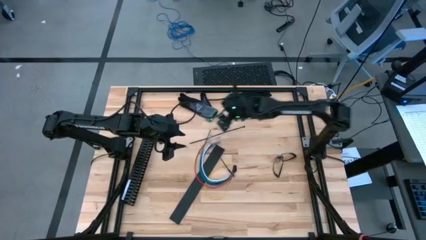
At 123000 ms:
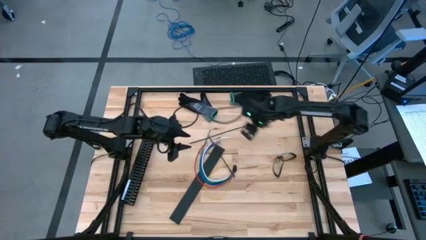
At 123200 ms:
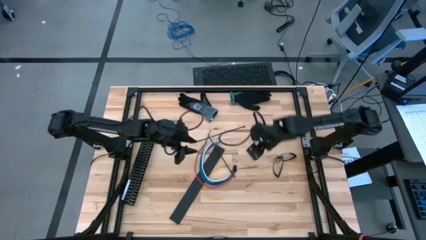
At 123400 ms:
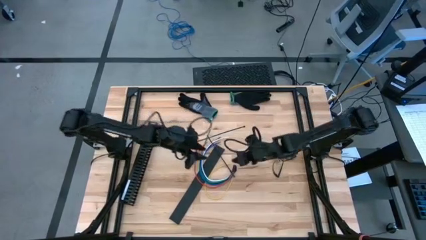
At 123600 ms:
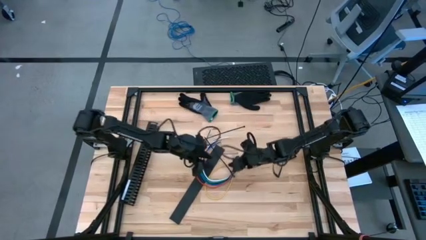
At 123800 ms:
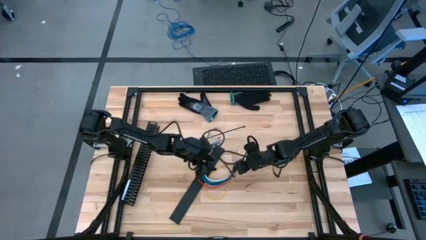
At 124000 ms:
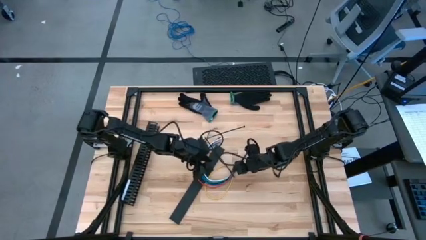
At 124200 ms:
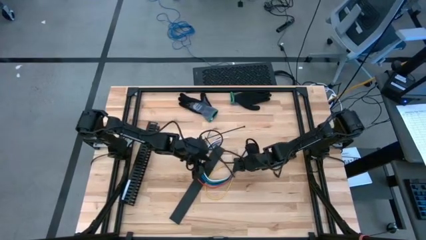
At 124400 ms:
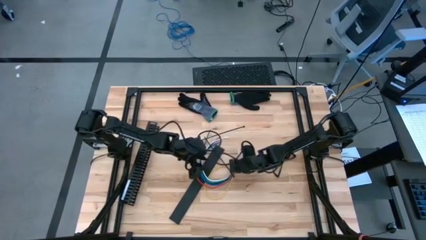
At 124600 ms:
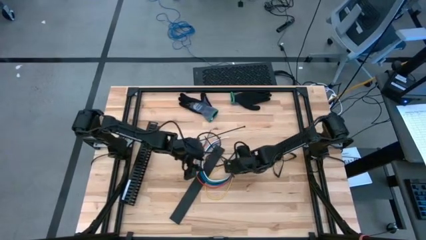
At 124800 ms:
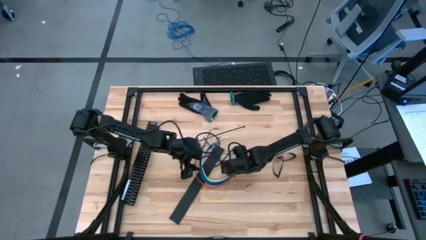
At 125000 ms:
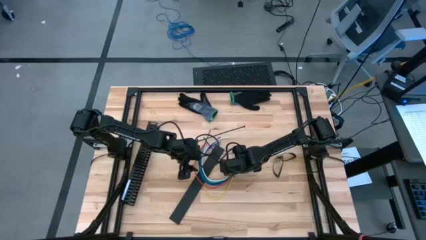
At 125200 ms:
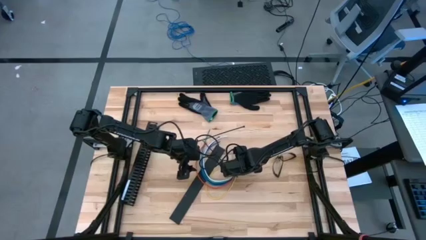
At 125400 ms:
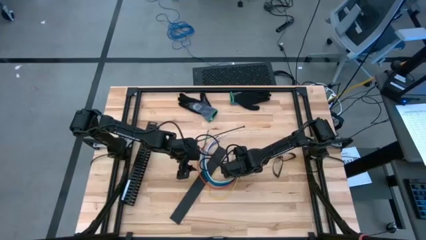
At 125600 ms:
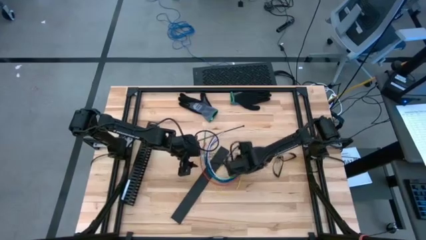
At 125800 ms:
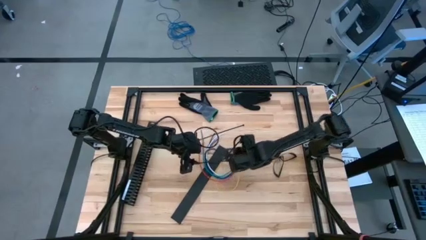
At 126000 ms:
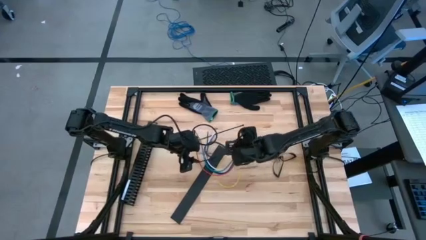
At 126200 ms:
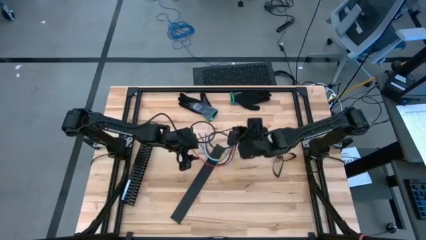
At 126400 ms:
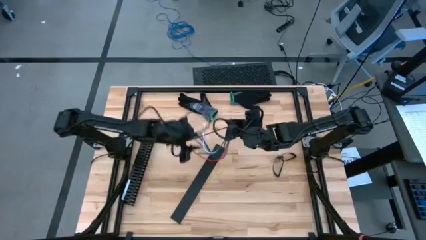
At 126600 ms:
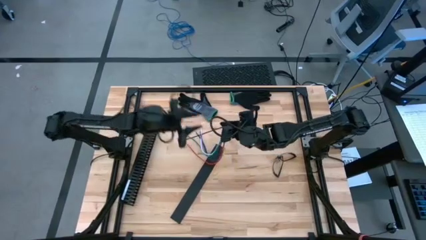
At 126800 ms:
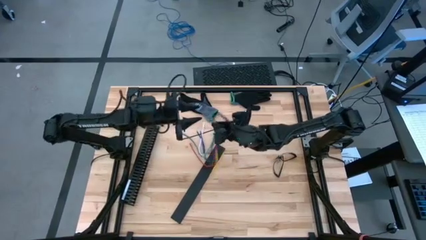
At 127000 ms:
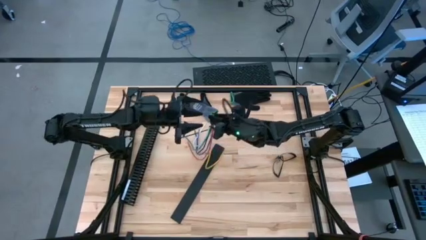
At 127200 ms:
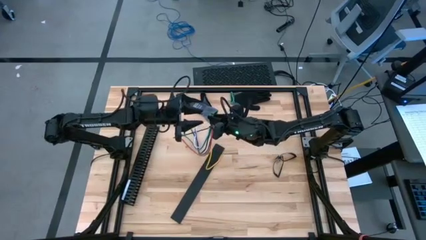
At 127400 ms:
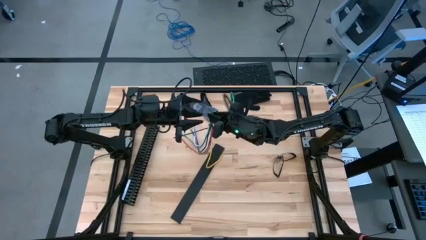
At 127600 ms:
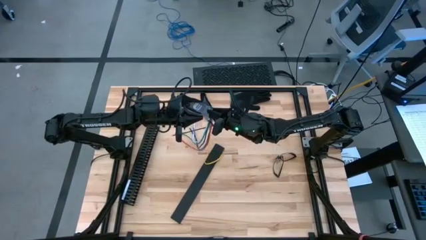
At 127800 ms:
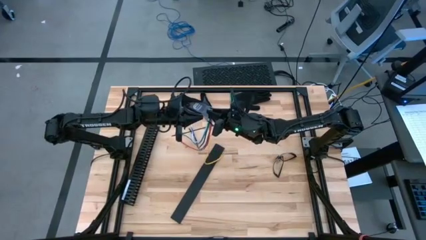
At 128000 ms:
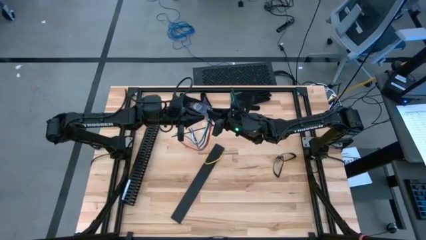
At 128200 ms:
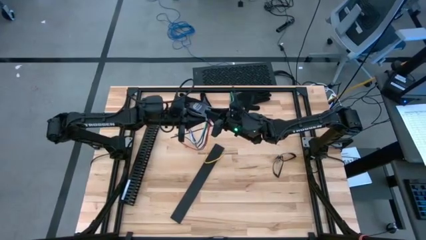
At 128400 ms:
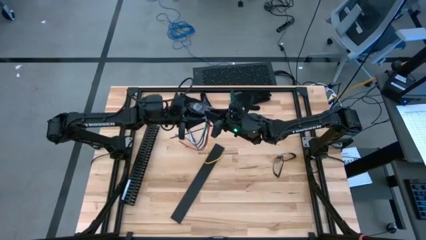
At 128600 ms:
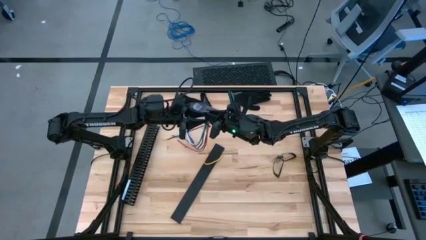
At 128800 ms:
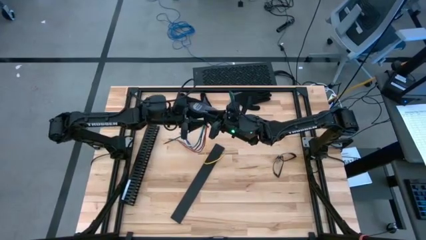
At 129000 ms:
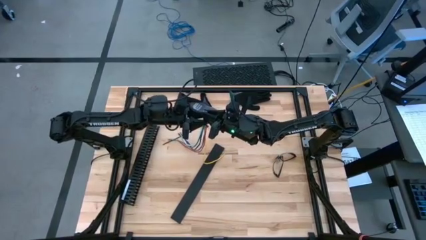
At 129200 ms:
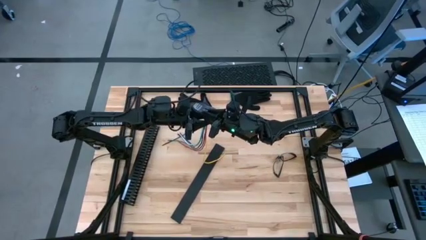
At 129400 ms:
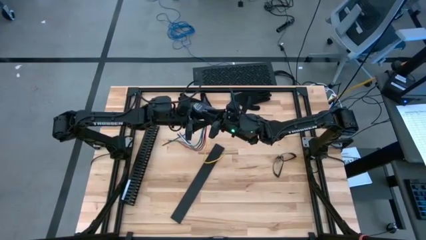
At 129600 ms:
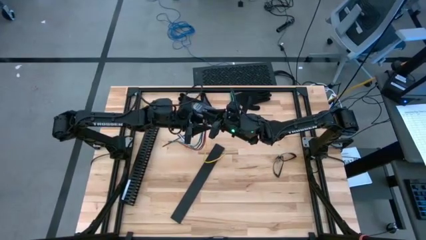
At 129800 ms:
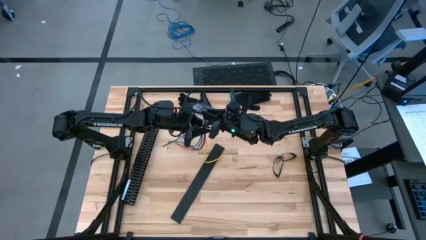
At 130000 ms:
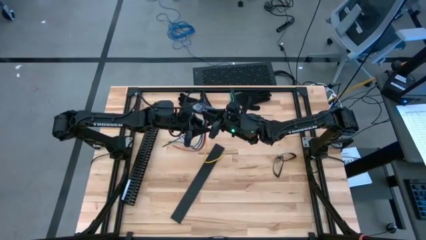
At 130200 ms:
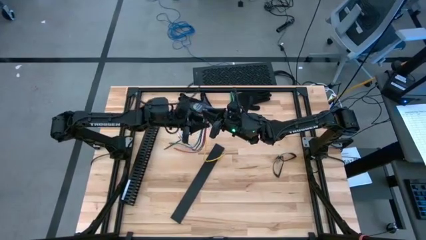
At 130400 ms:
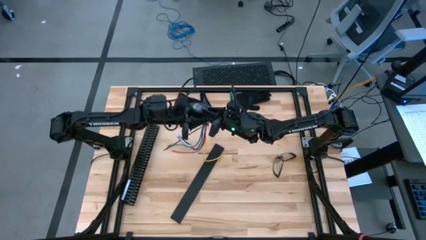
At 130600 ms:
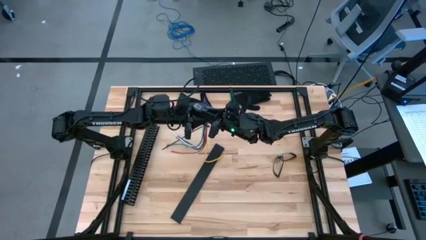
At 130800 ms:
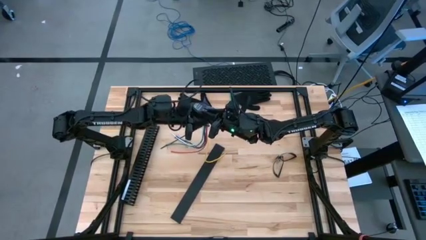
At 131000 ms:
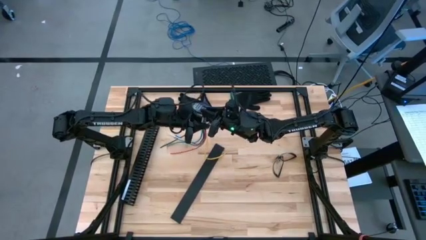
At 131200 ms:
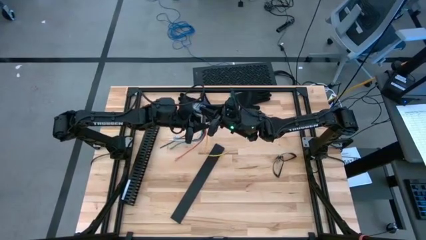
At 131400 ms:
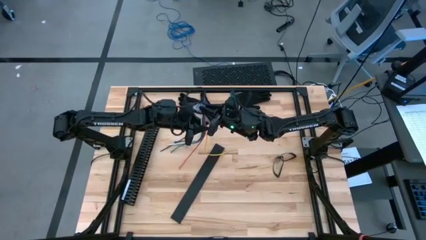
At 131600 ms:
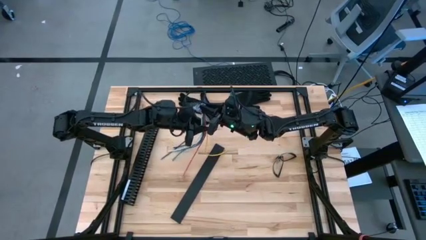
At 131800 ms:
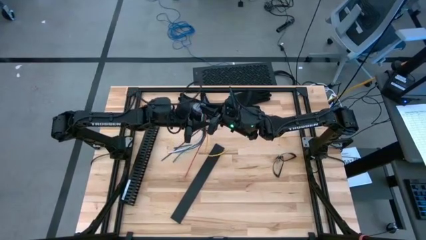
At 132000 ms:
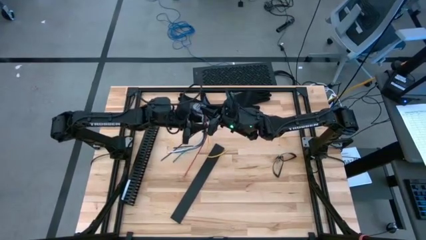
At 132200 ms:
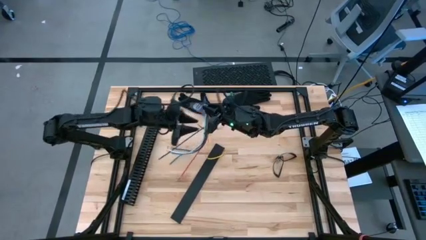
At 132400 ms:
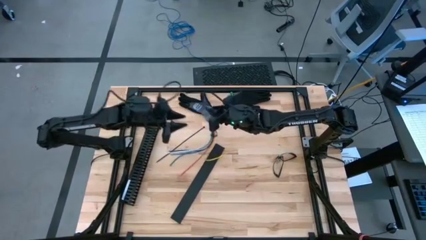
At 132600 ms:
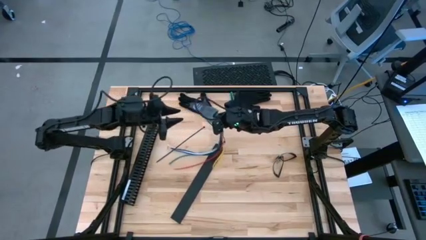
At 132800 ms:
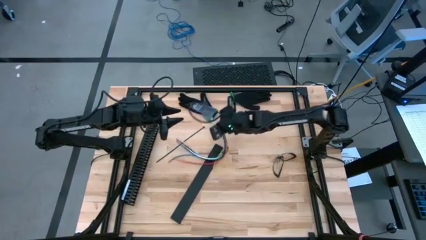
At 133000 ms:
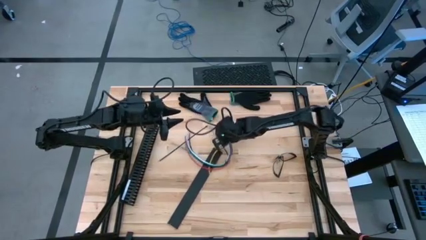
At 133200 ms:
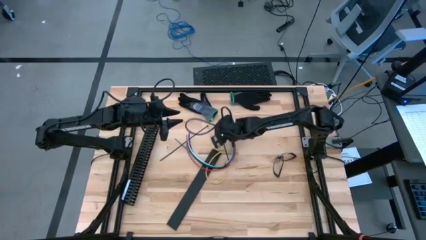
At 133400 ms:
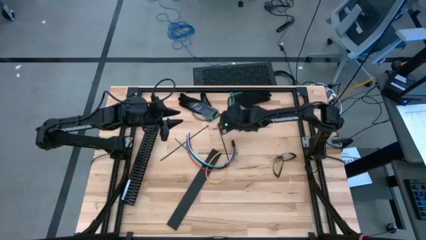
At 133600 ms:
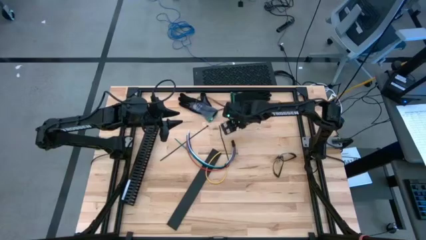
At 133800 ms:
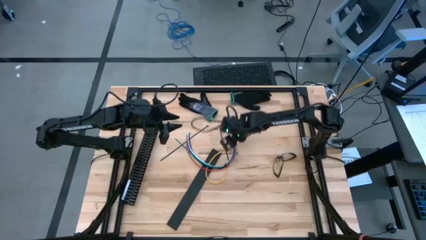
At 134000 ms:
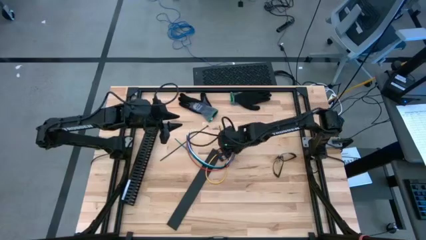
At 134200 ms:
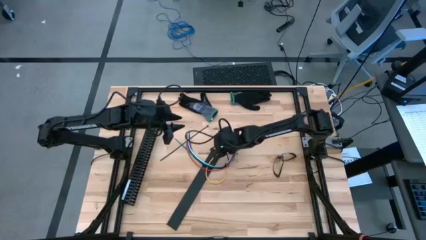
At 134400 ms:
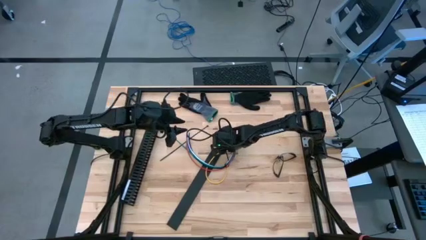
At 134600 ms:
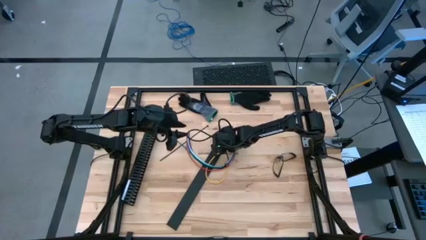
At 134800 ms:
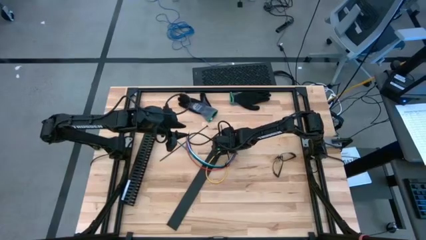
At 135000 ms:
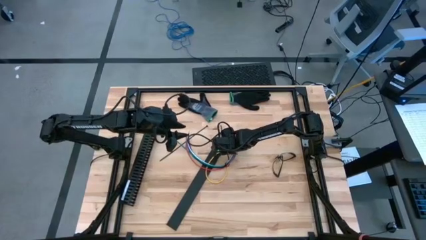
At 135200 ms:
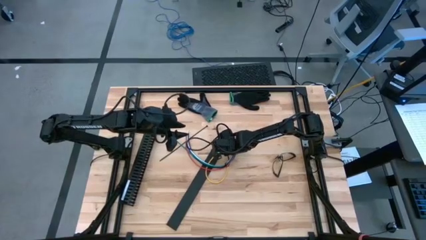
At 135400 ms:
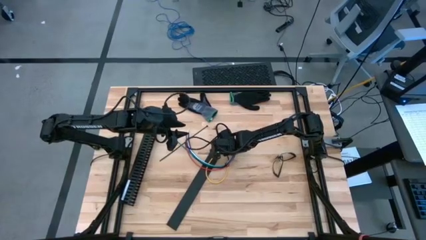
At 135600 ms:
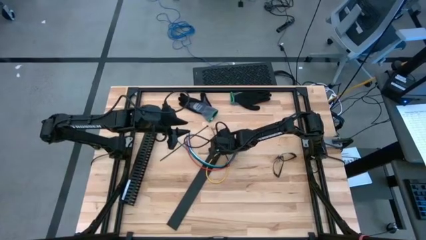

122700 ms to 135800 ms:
Task: Ziptie cables
Wrap the cables using a black zip tie

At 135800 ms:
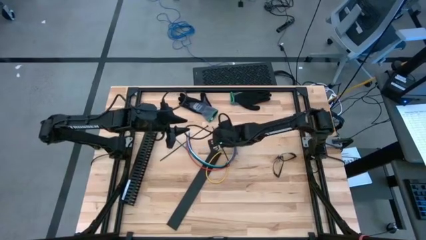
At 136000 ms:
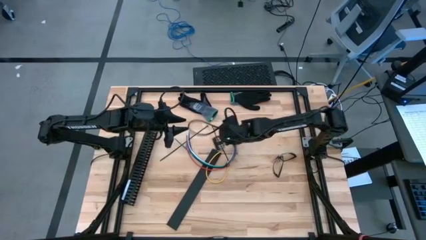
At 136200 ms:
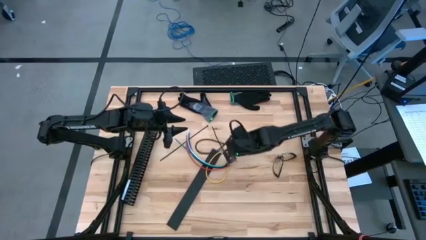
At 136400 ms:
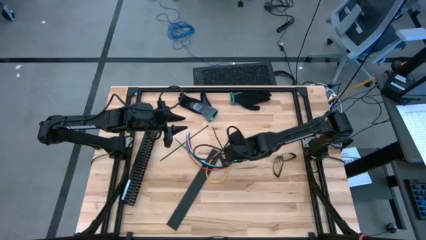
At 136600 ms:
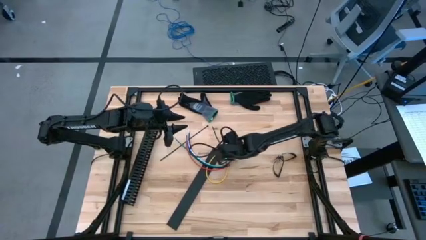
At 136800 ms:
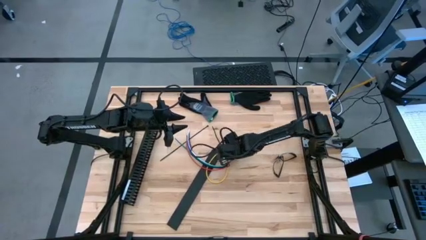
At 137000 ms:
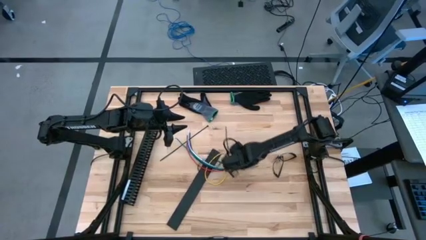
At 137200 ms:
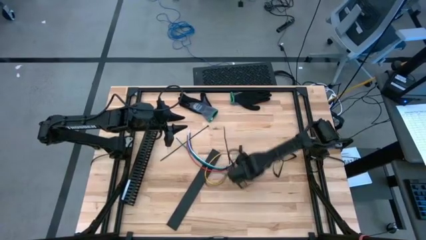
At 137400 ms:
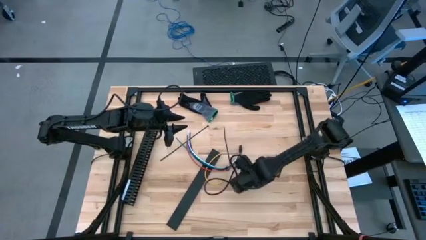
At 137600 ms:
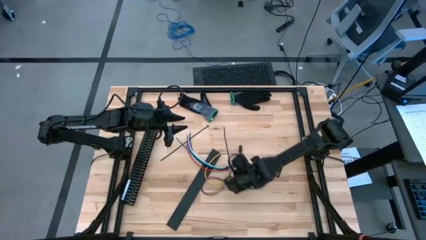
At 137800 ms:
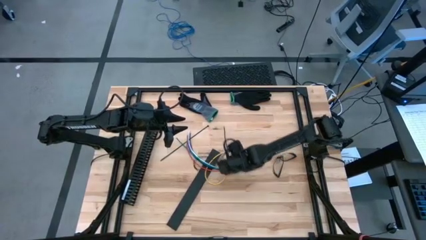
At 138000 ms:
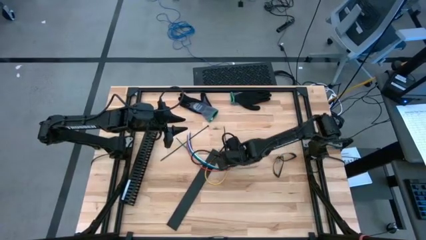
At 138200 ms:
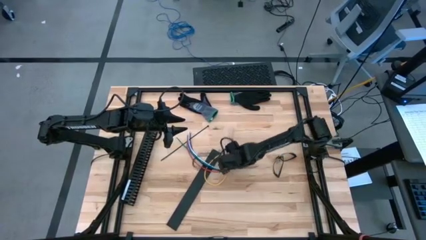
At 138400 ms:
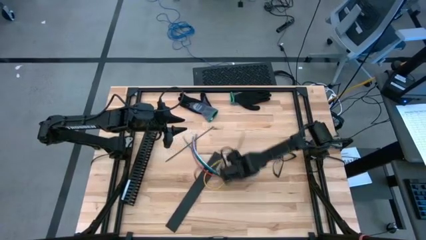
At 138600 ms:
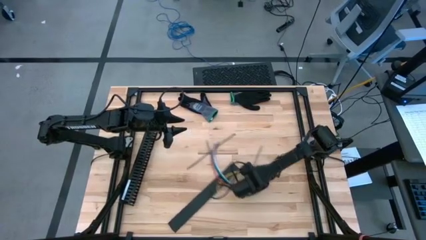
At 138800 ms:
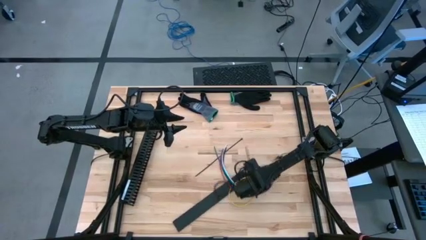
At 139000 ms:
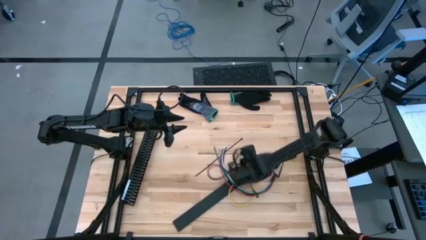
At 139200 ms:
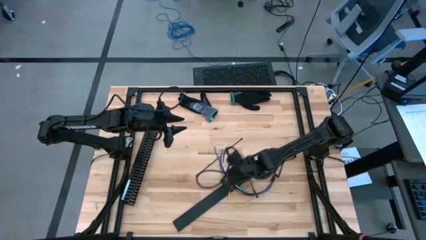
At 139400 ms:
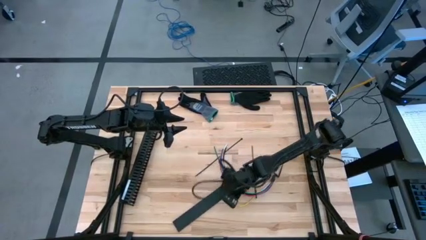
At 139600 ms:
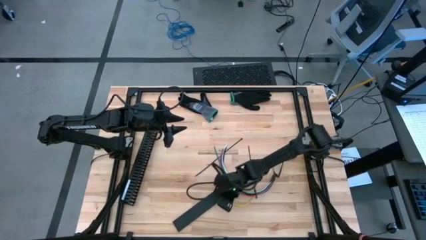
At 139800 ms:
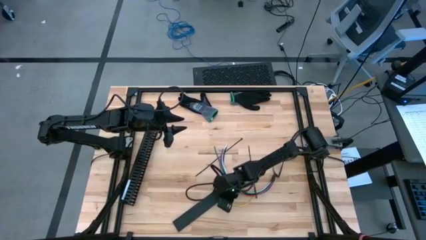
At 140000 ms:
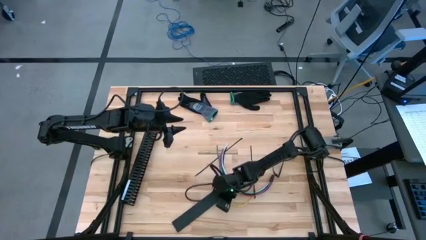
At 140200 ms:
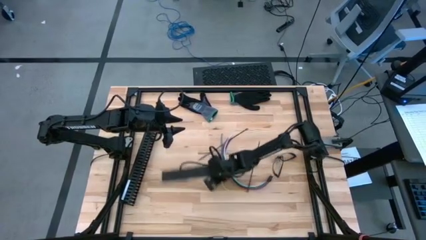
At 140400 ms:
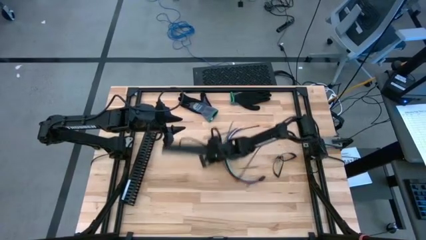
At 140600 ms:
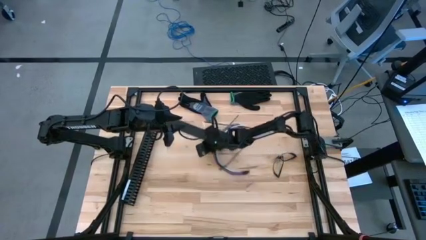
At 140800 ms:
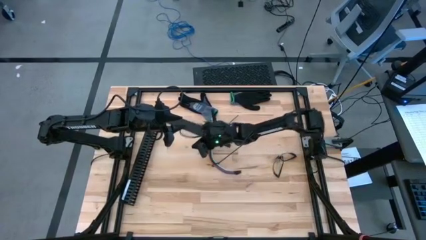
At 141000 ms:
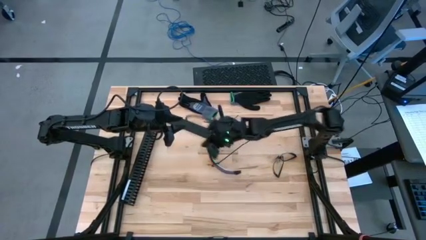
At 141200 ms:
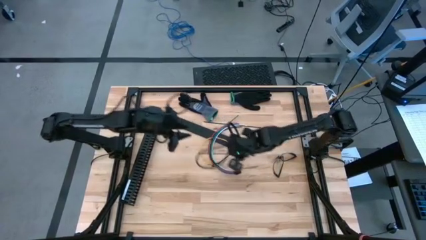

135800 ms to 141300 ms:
Adjust the cables
